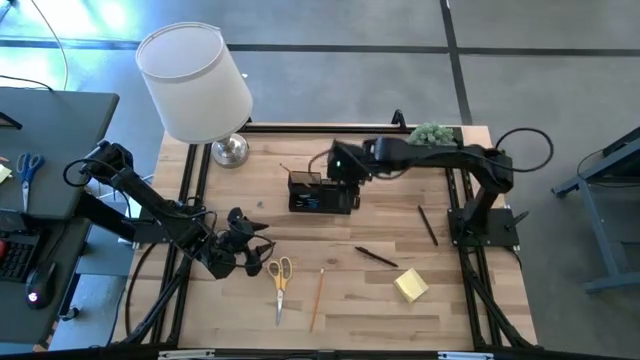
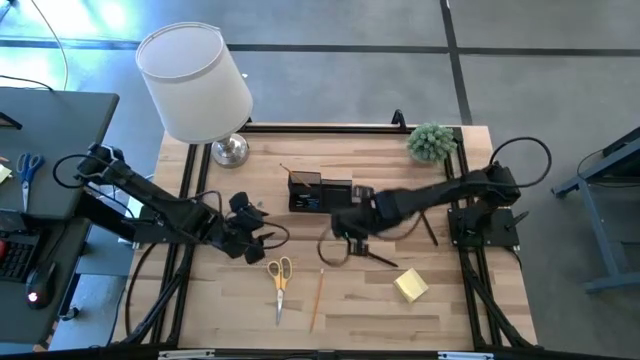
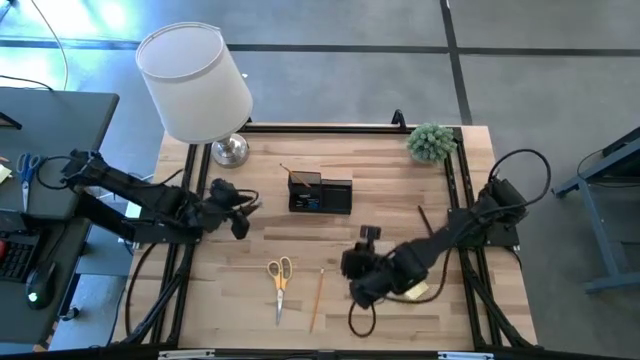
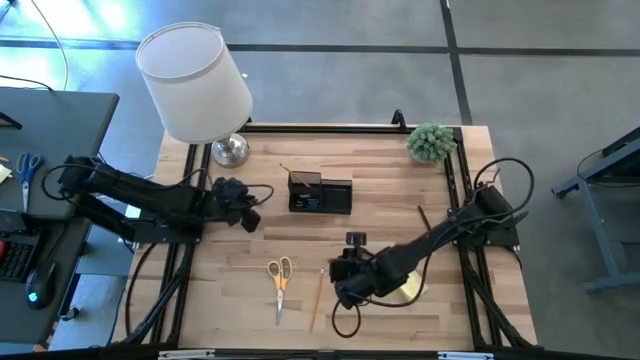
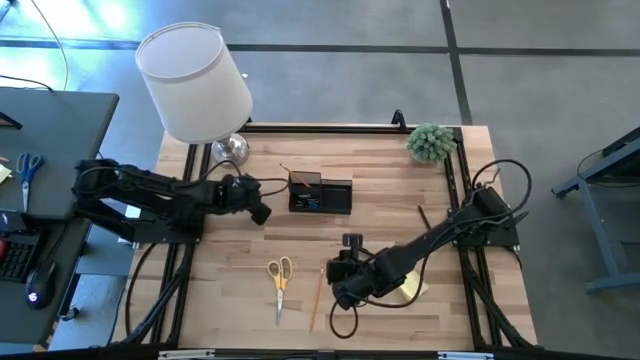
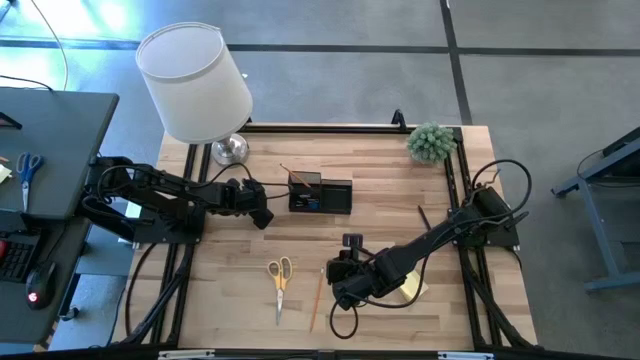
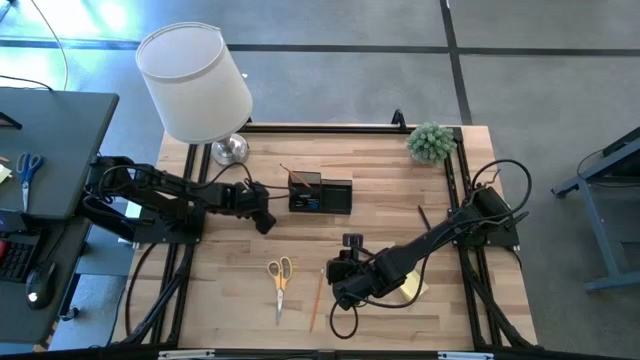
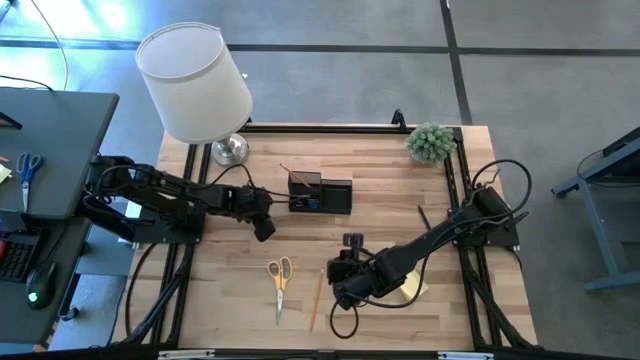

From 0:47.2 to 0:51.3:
Task: Pick and place office supplies into organizer
Put the blue binder clip into the desk organizer

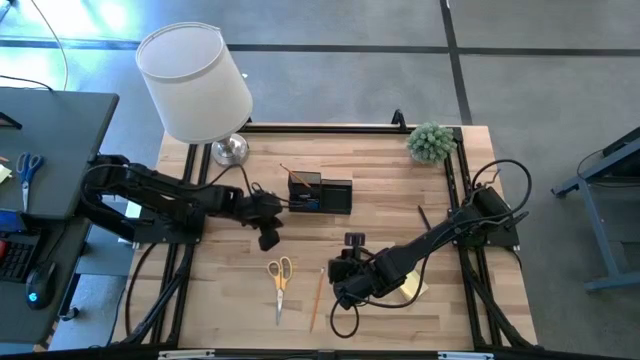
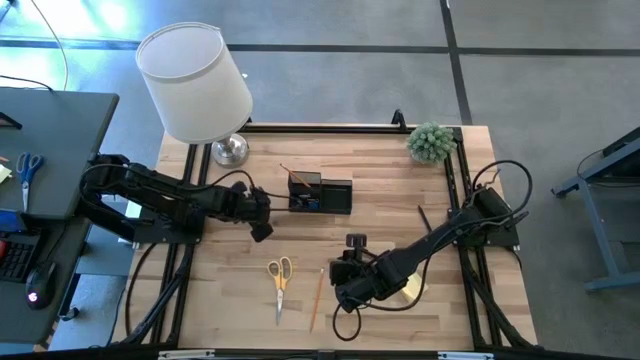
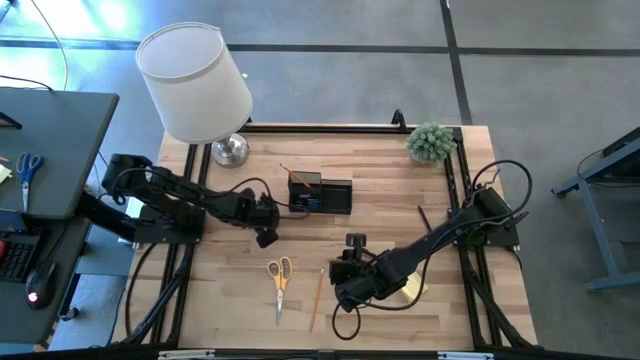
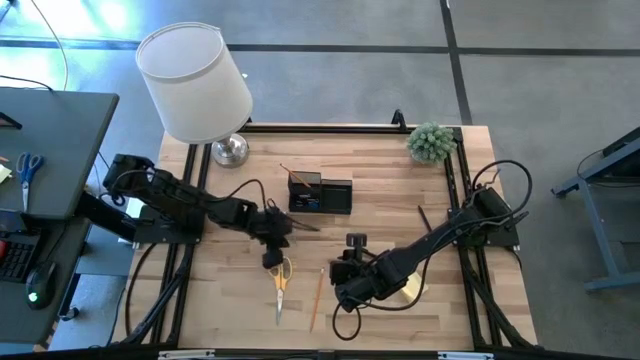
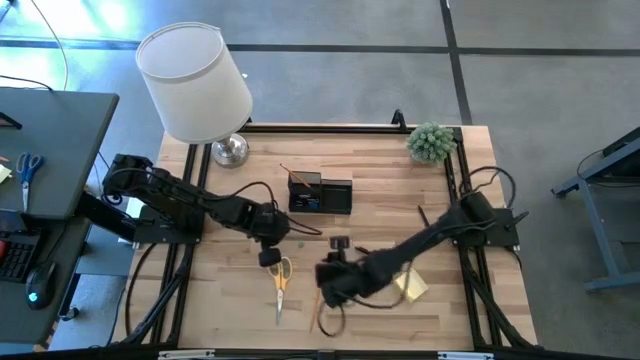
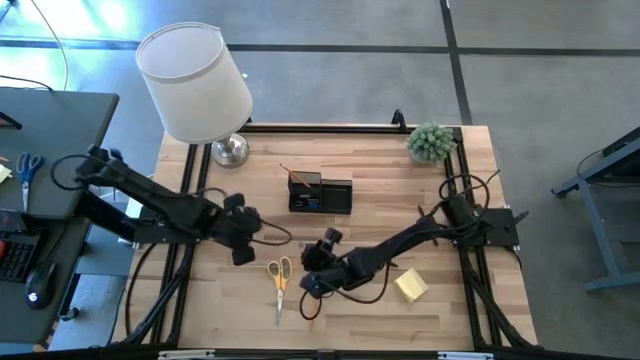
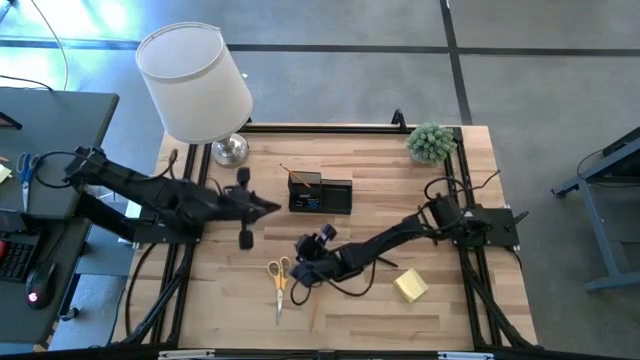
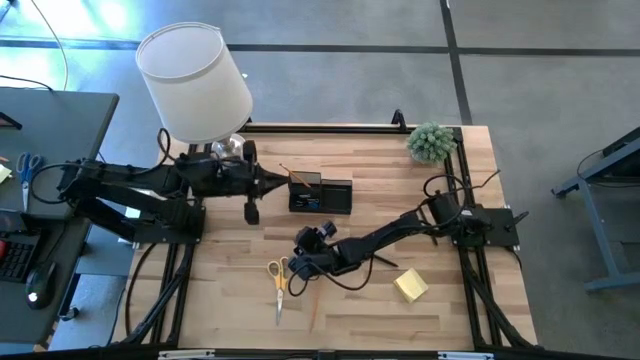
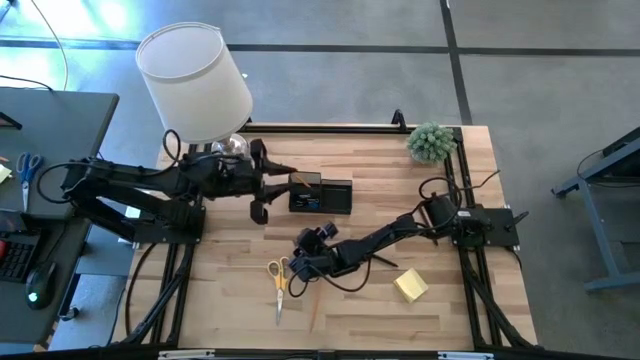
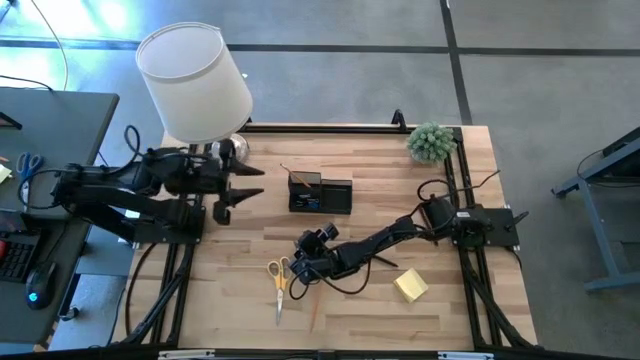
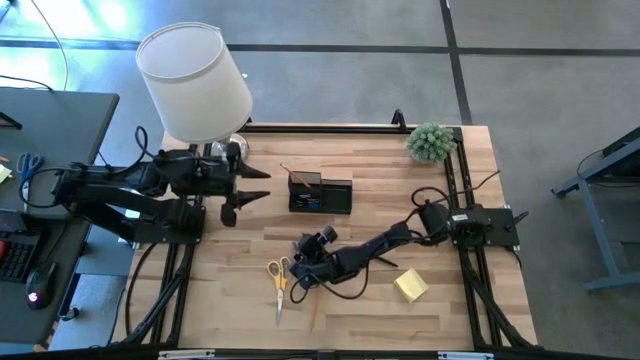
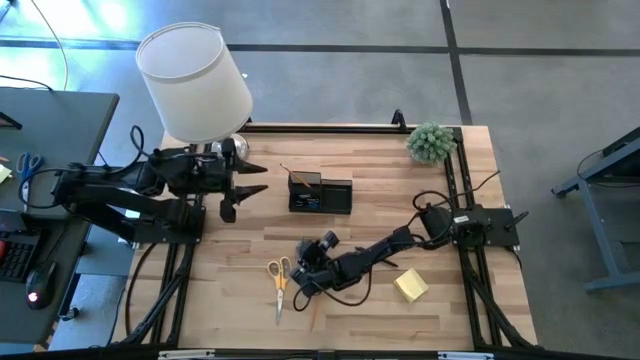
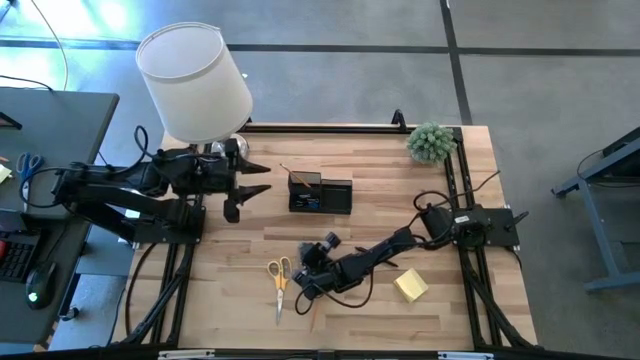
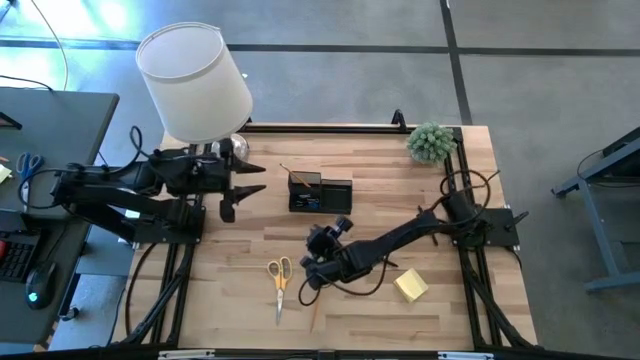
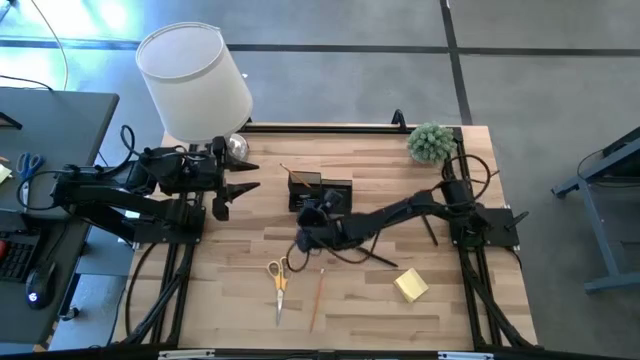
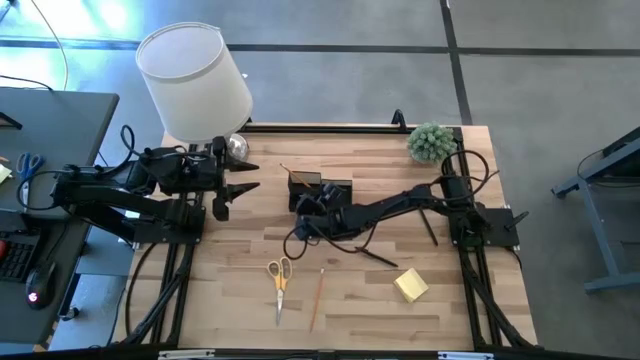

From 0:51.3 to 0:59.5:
Put the blue binder clip into the desk organizer

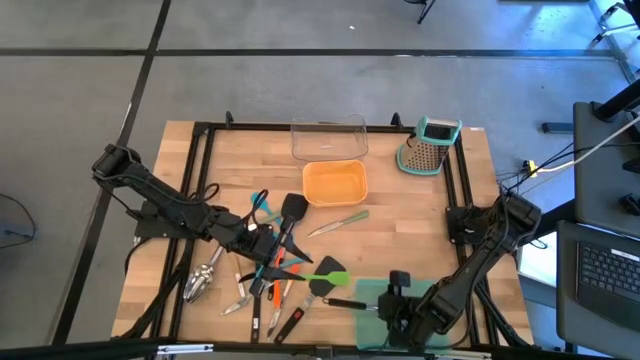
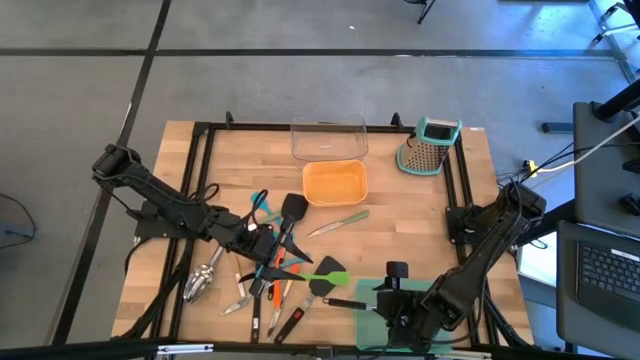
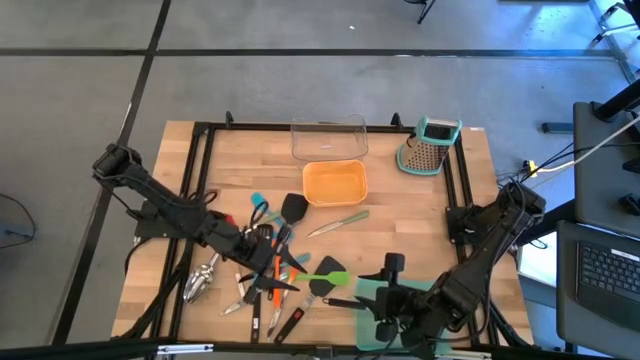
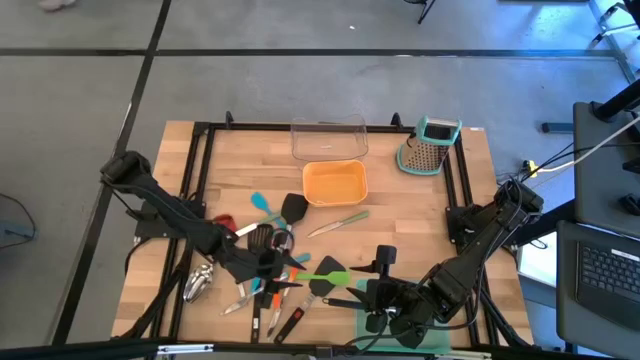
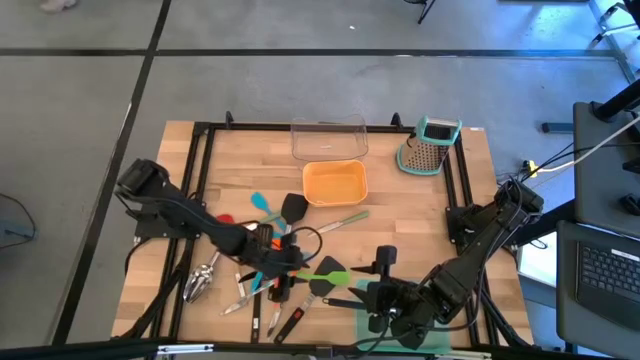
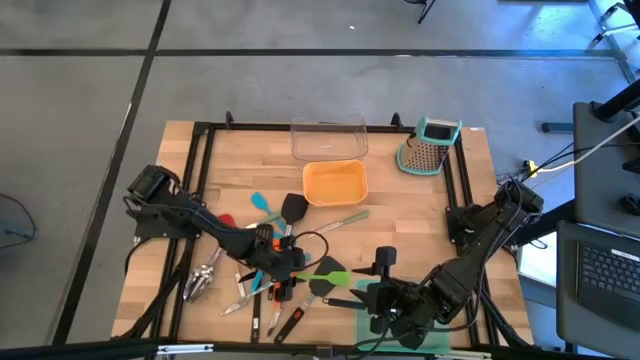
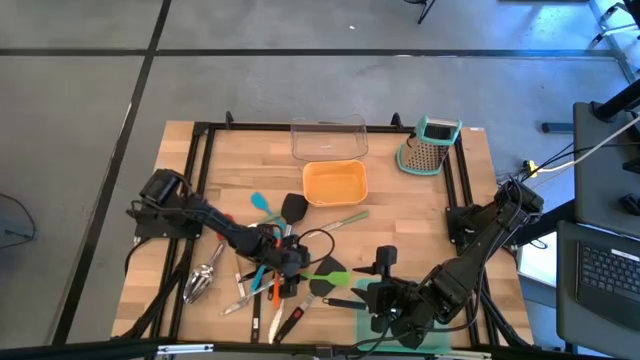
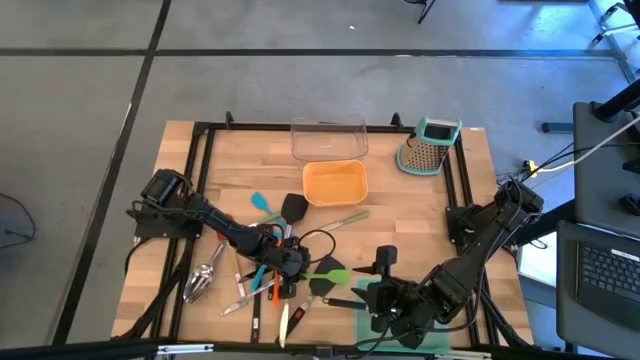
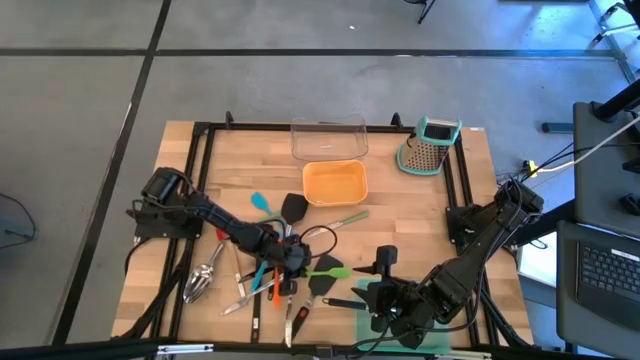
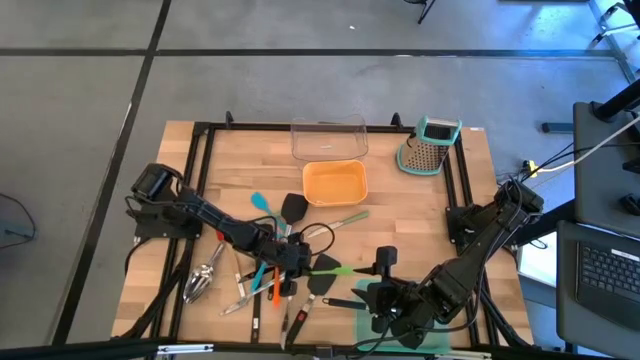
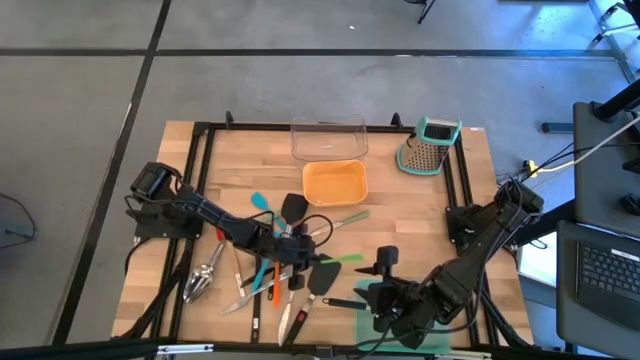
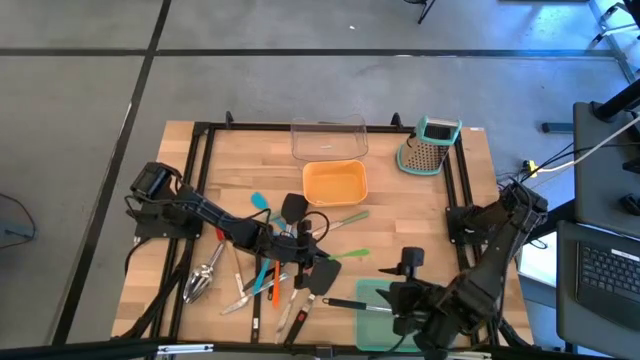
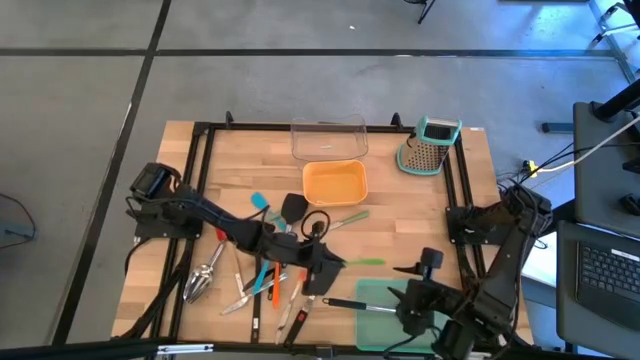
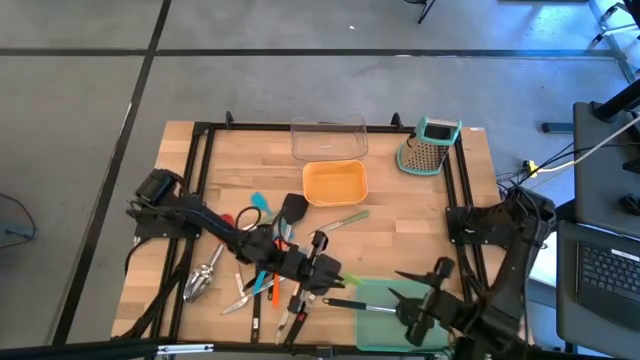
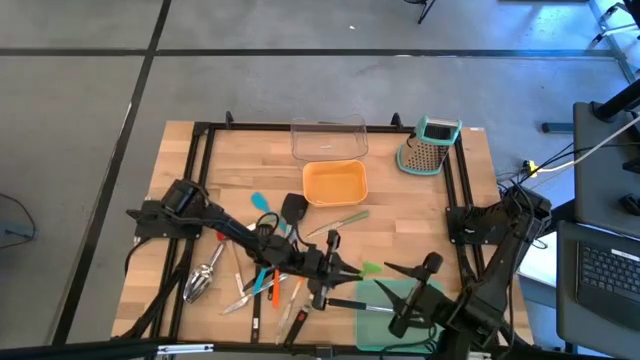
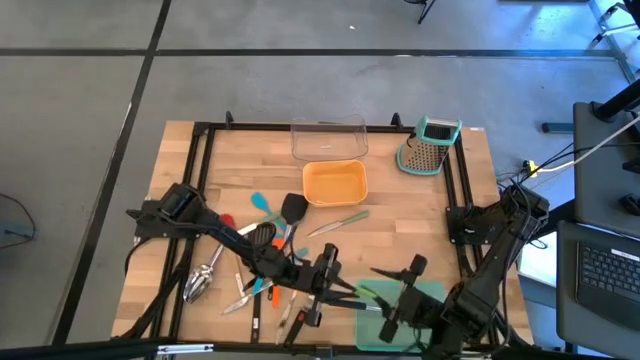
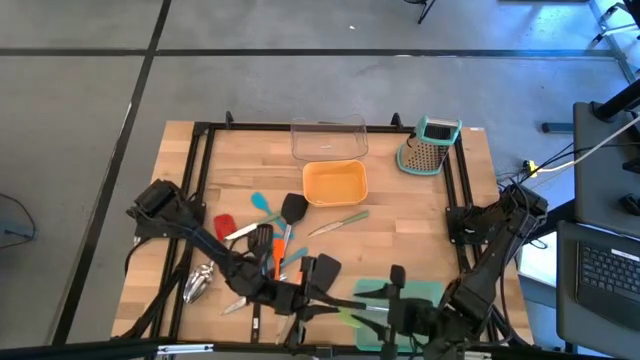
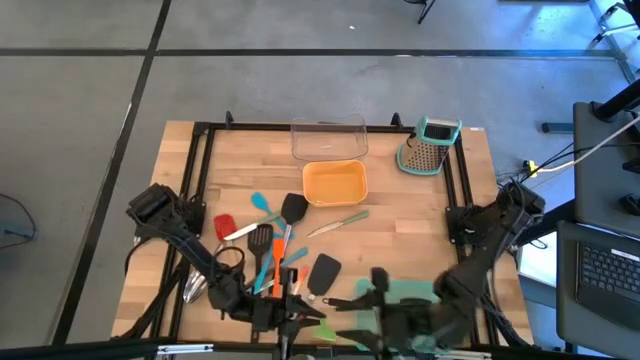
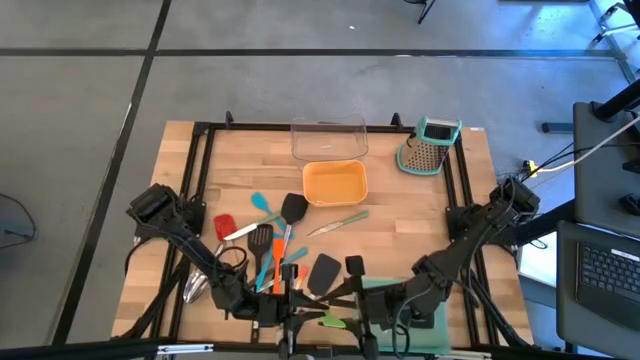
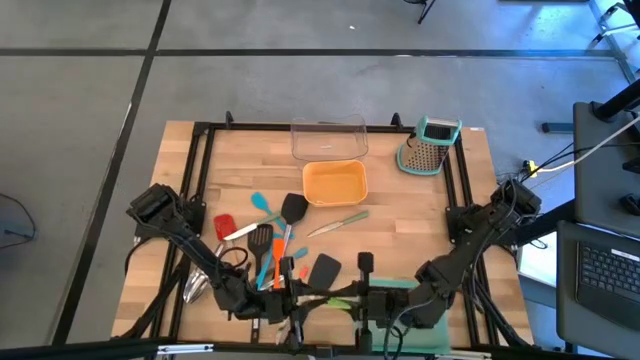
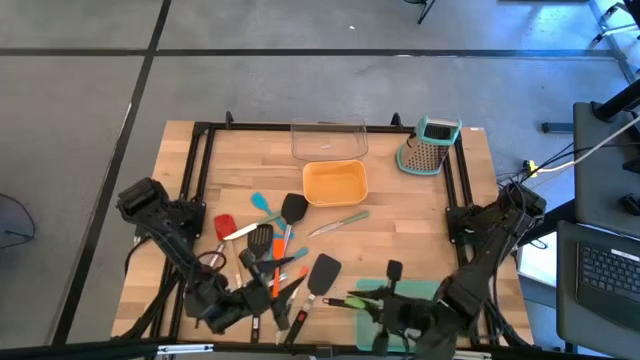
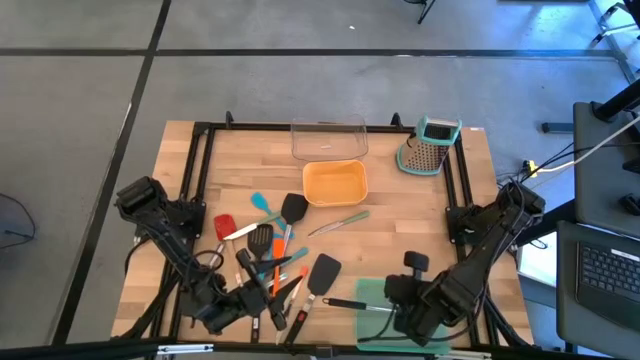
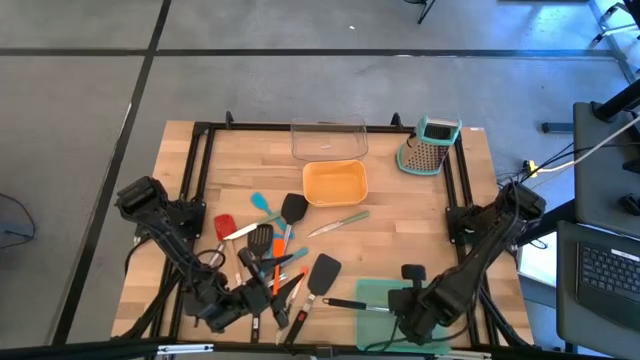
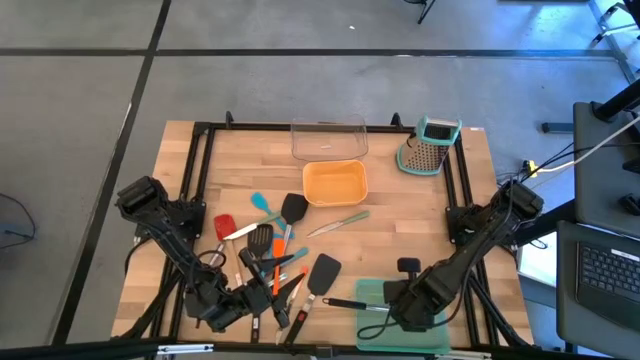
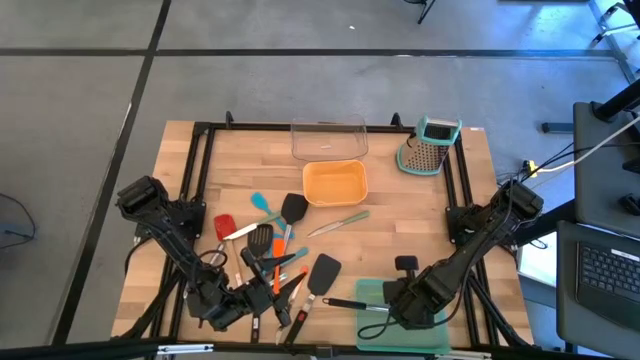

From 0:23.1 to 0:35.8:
Task: Pick & Place Kitchen Items
Put the green silicone spatula into the green bin
